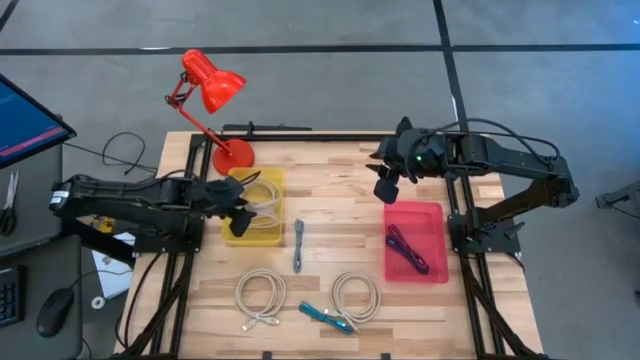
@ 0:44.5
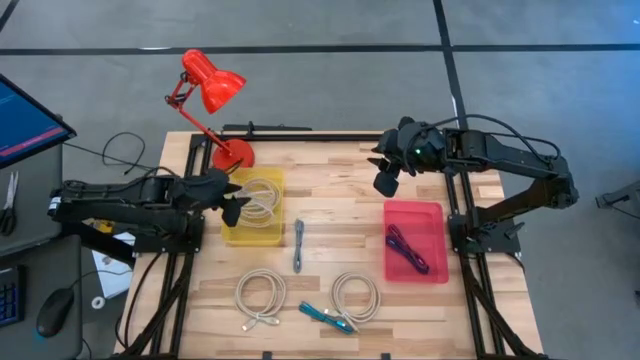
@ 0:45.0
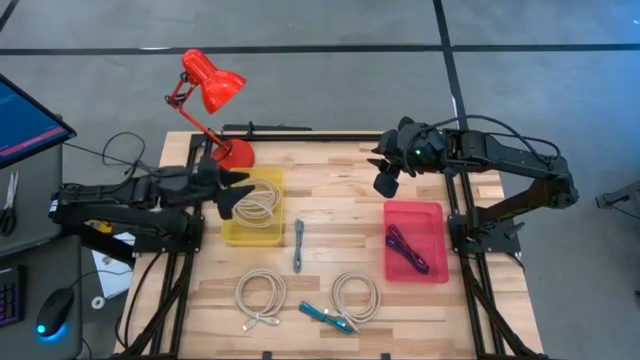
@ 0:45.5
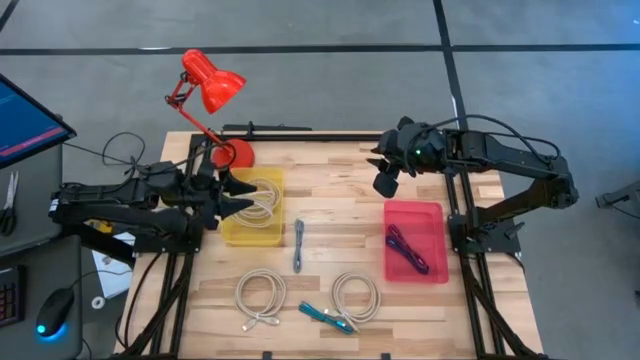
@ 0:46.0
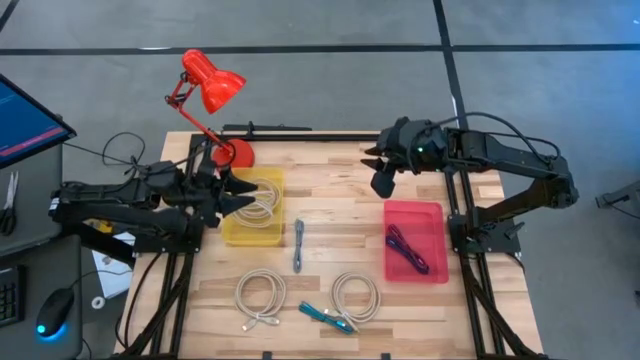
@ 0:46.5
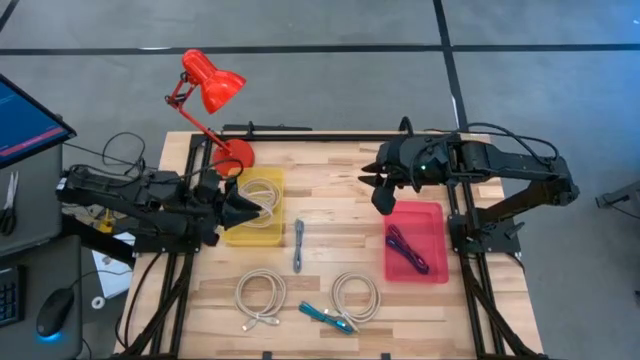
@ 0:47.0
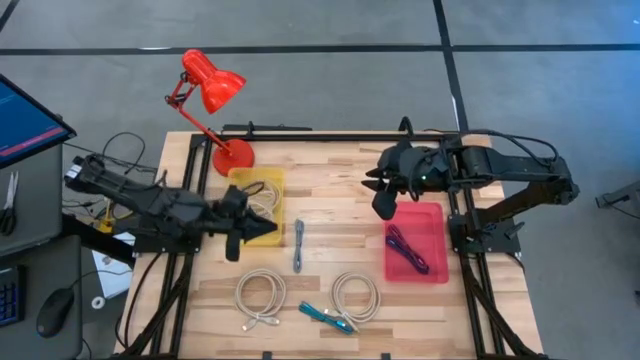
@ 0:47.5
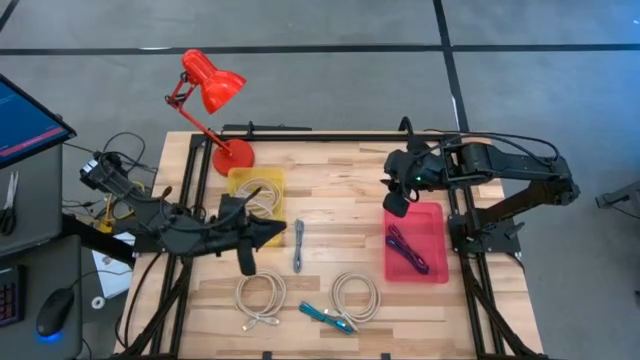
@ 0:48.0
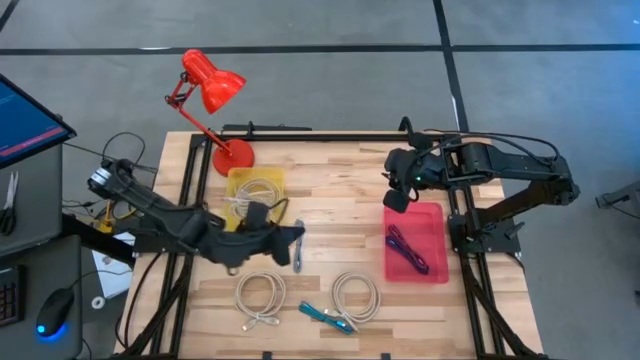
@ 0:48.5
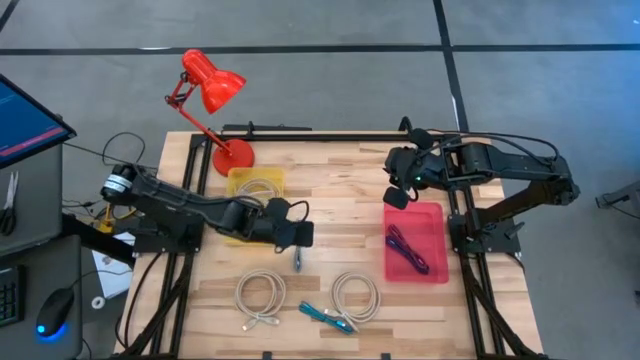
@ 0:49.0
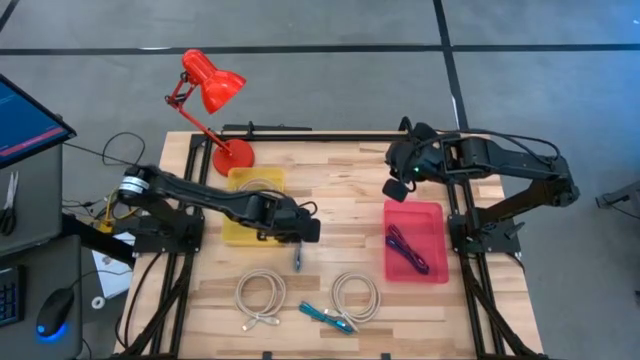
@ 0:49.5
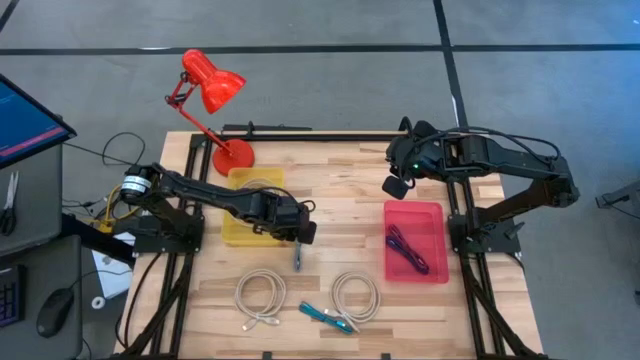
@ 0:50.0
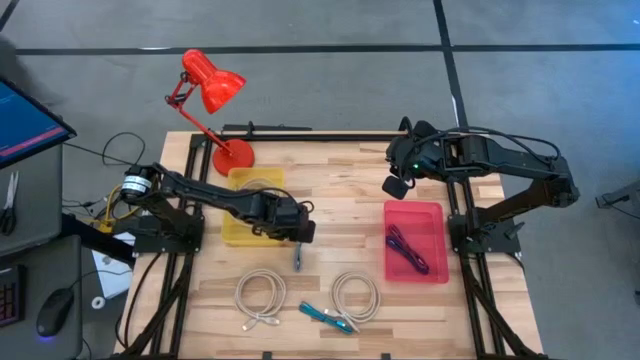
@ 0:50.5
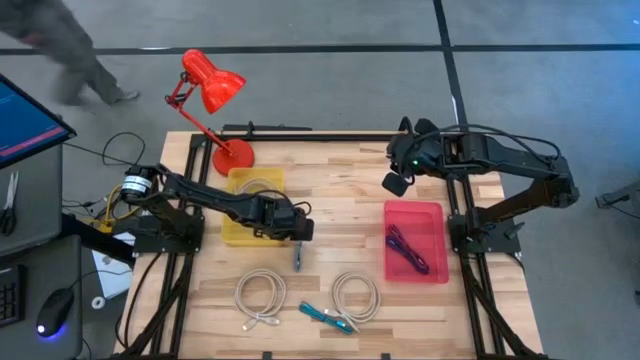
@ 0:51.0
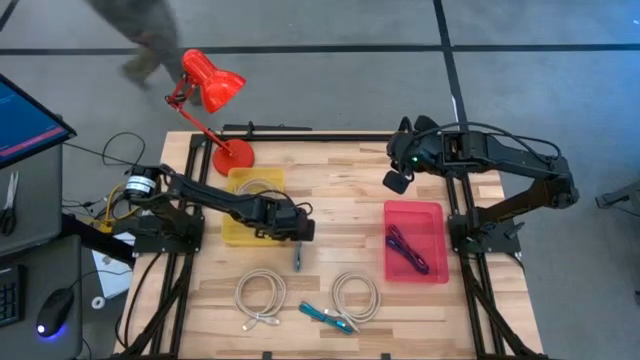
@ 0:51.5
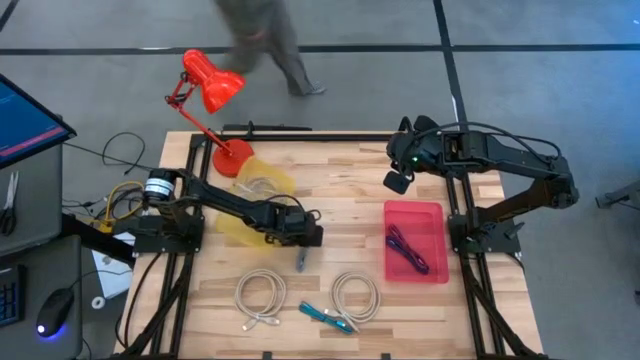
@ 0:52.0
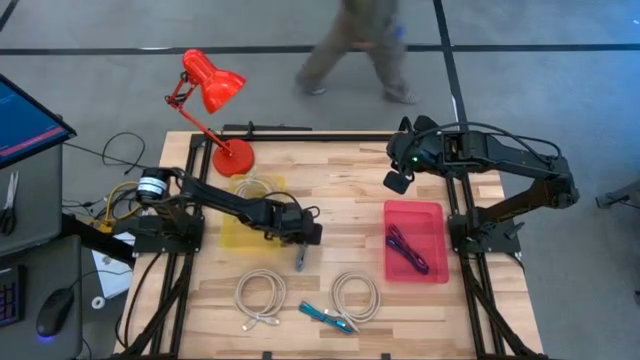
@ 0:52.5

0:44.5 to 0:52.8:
Task: Pick & Place USB Port
Put the black and white charger cable into the pink bin

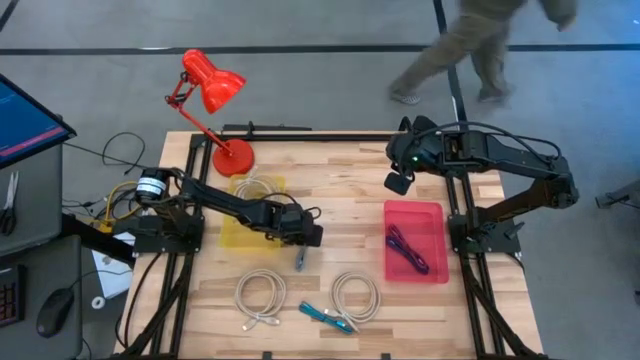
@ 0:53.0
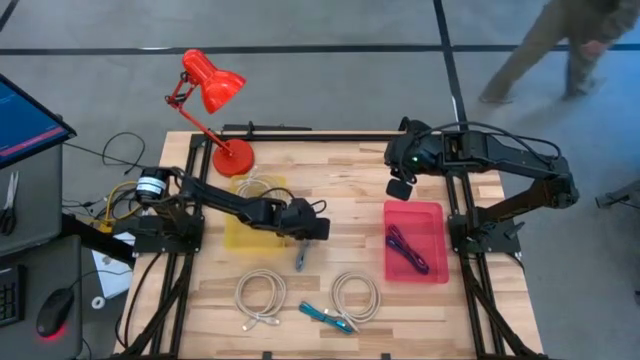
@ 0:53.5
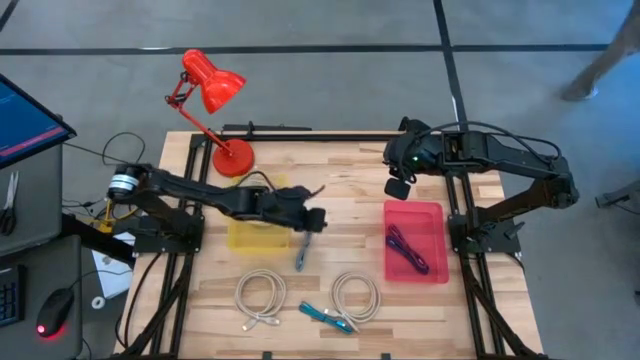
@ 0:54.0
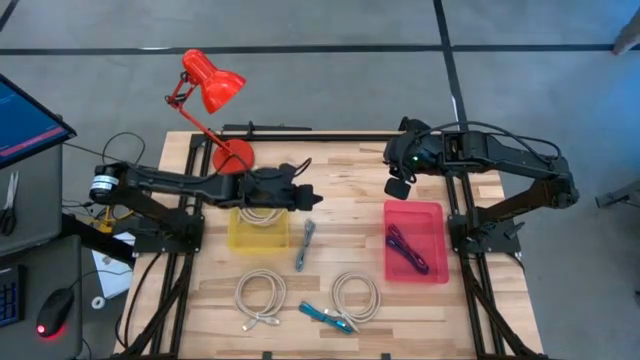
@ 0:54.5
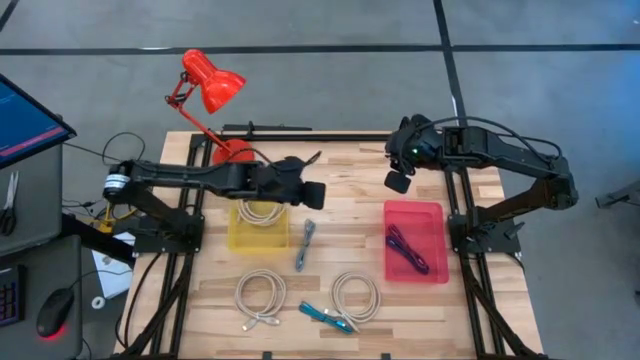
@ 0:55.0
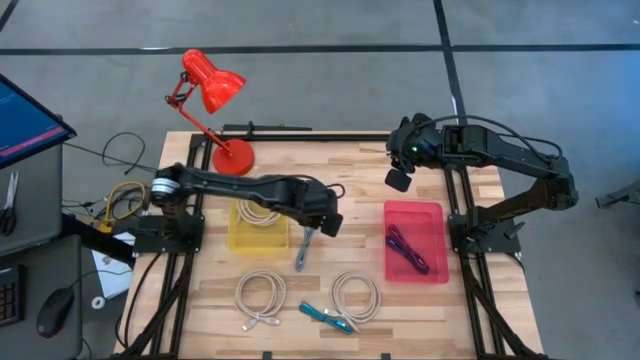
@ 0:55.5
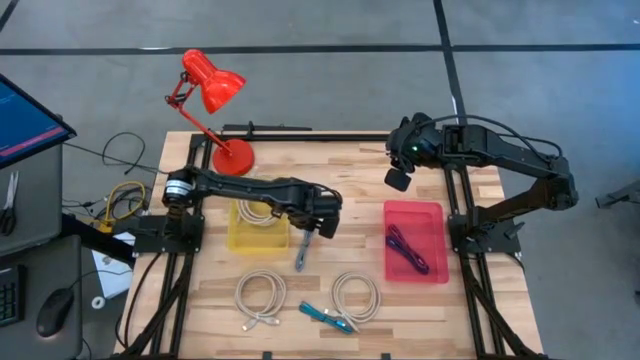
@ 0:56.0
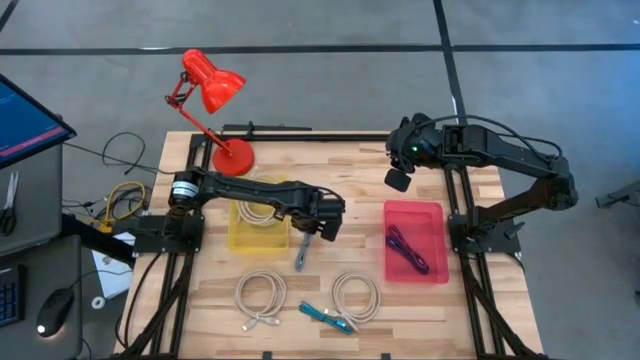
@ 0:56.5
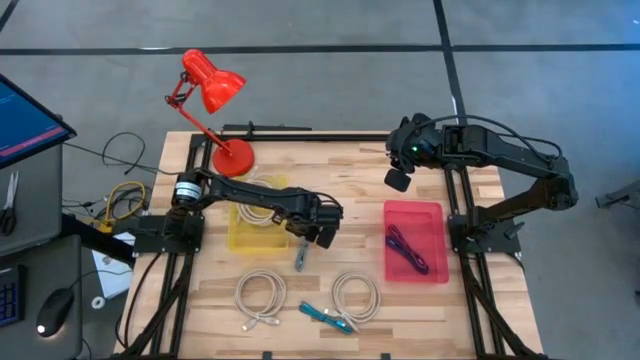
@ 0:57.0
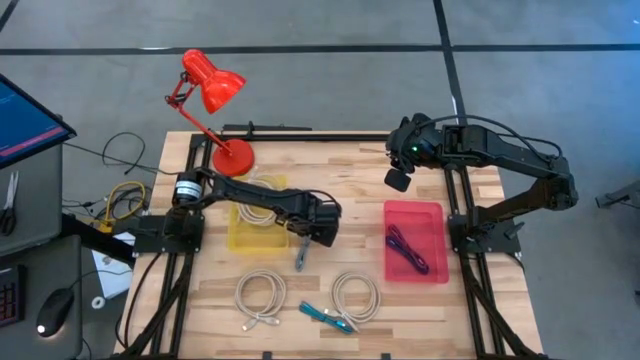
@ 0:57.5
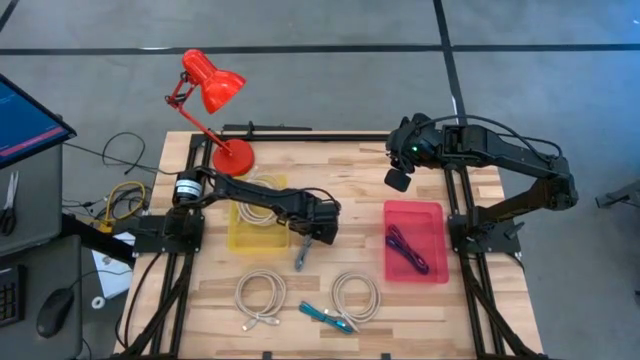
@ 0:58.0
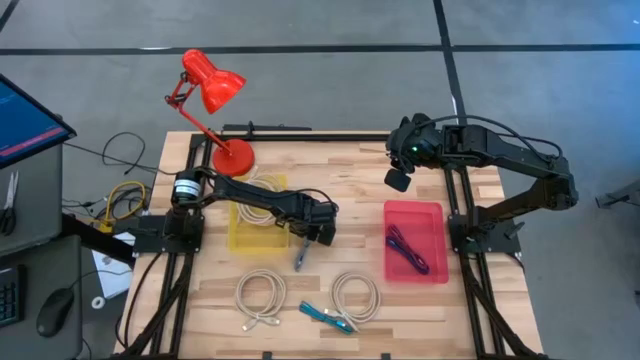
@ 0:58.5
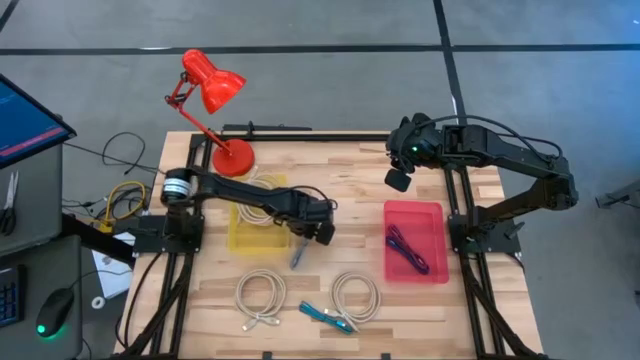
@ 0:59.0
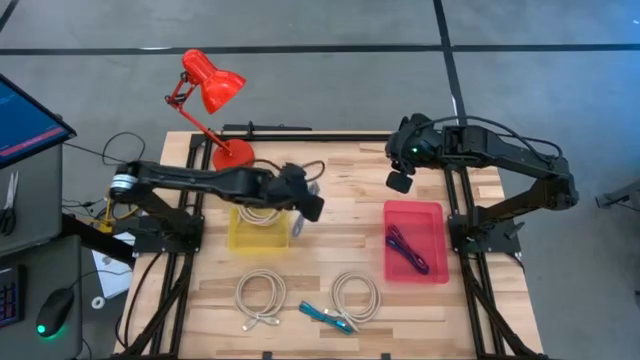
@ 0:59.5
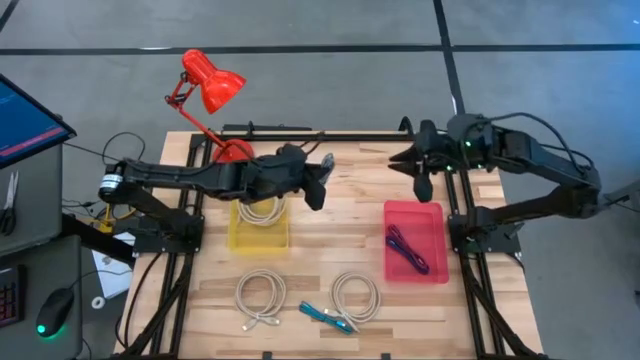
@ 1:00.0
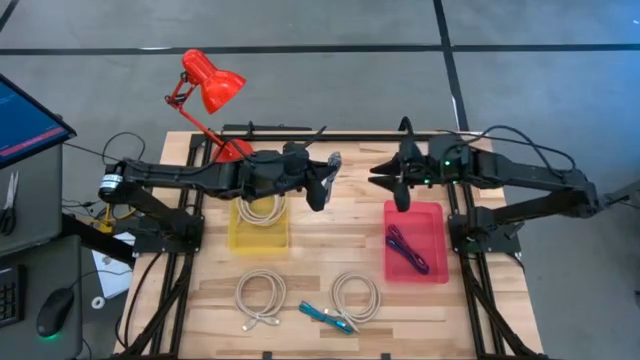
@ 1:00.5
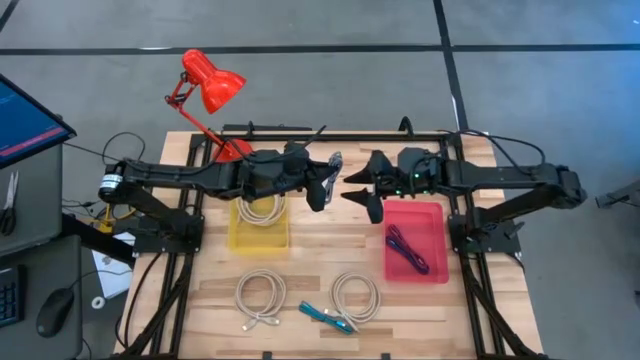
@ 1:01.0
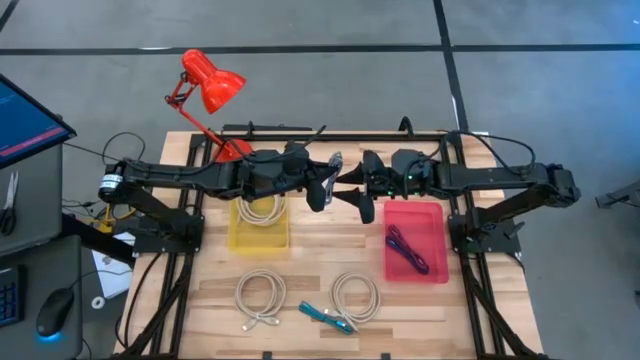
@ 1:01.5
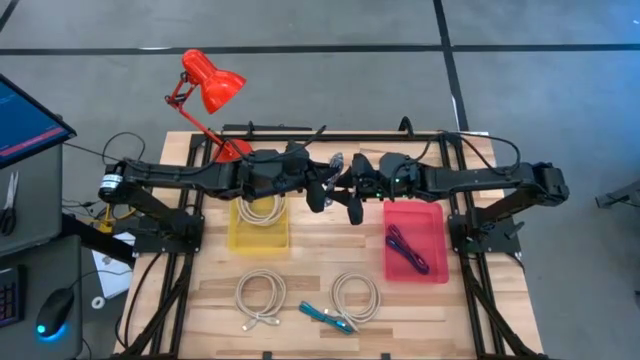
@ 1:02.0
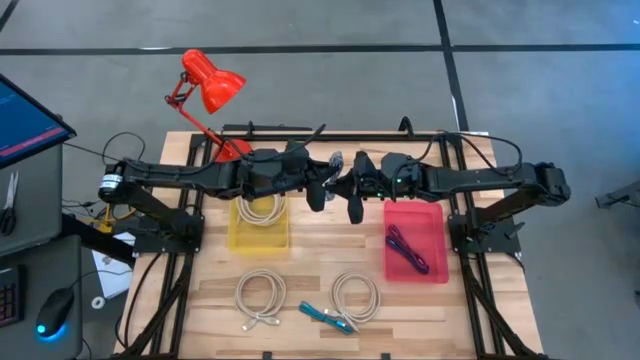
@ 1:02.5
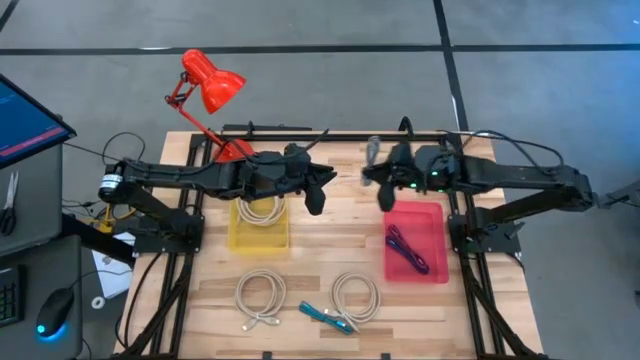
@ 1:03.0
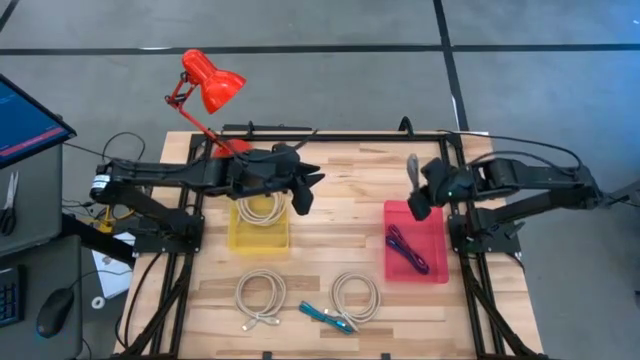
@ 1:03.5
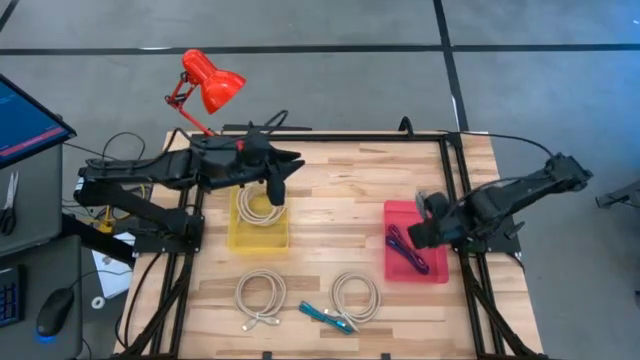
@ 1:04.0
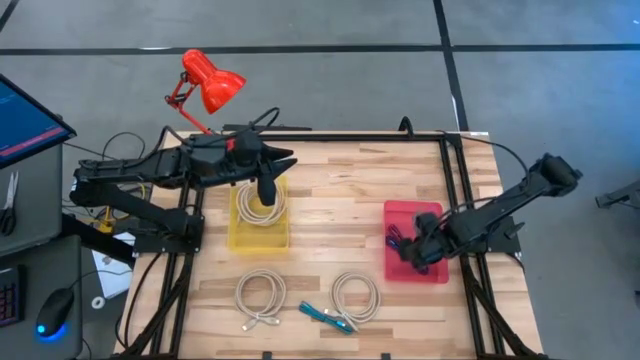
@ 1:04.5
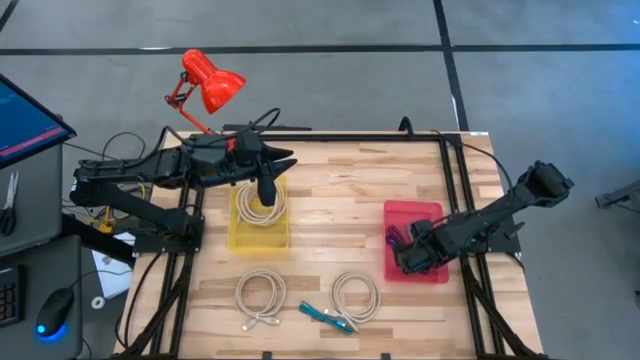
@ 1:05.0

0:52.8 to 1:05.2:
Put the black and white charger cable into the pink bin
